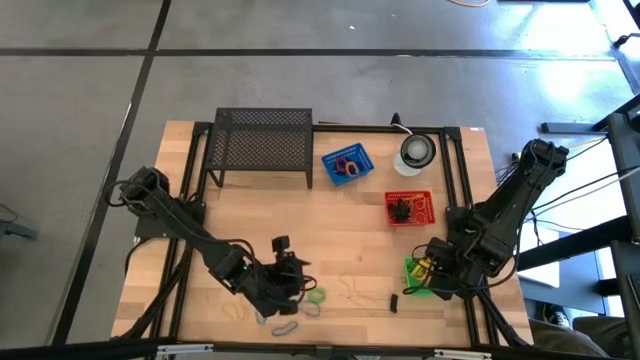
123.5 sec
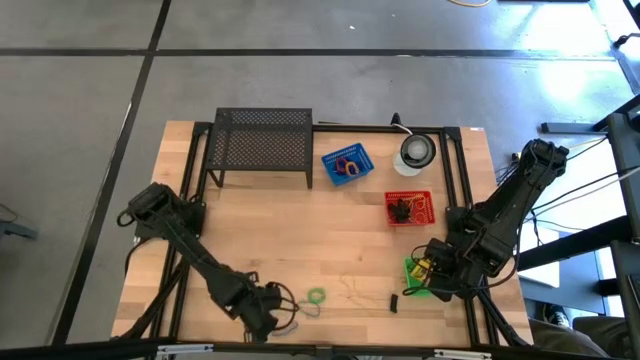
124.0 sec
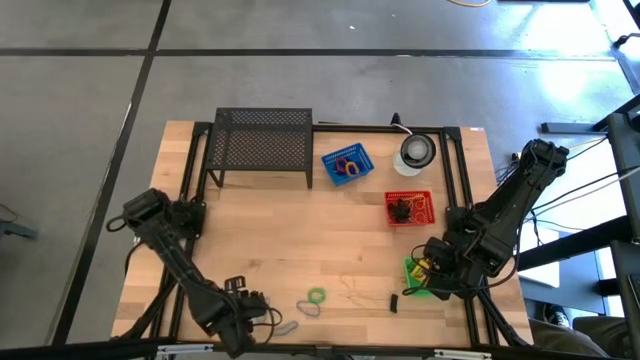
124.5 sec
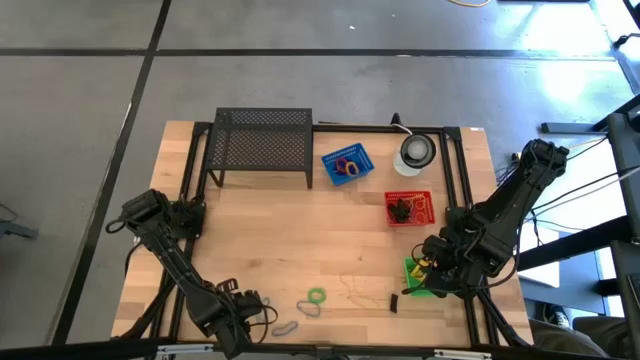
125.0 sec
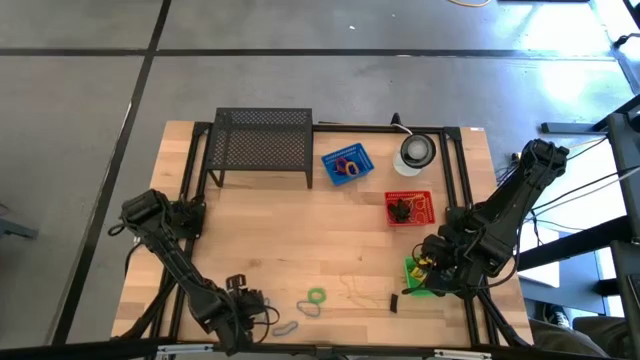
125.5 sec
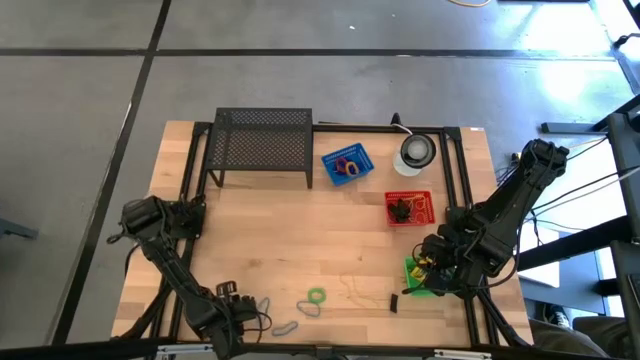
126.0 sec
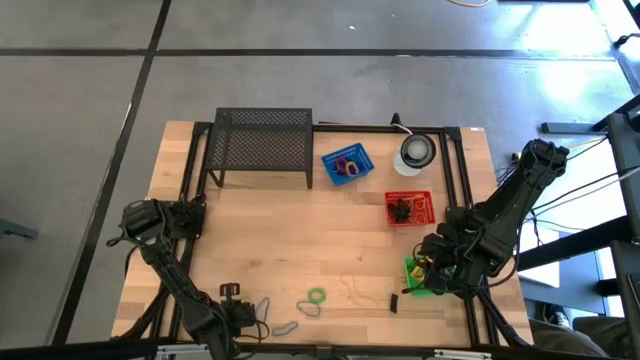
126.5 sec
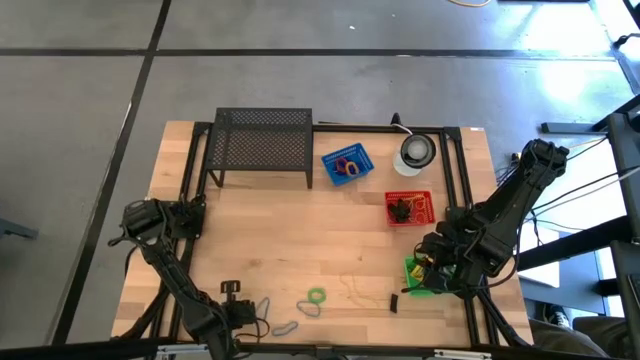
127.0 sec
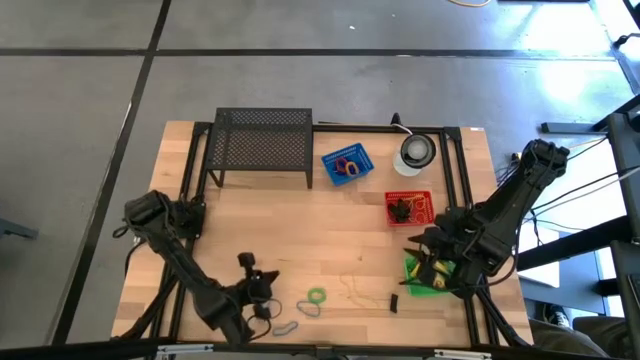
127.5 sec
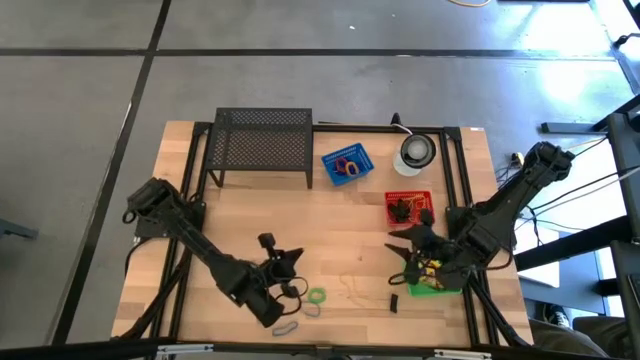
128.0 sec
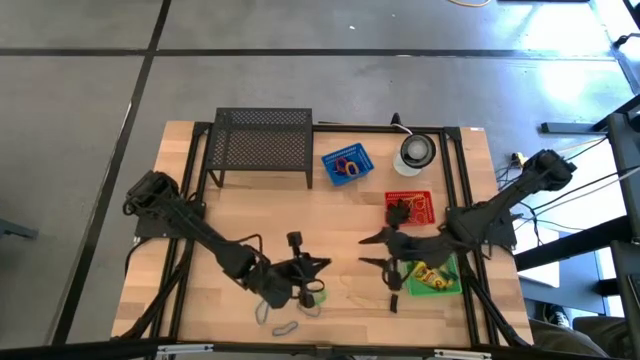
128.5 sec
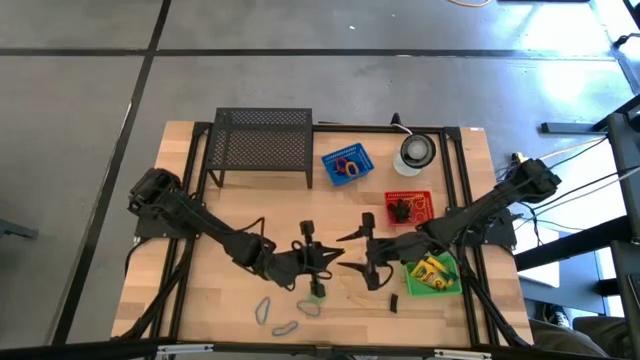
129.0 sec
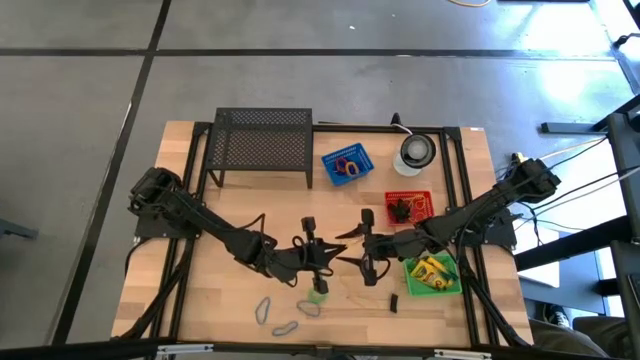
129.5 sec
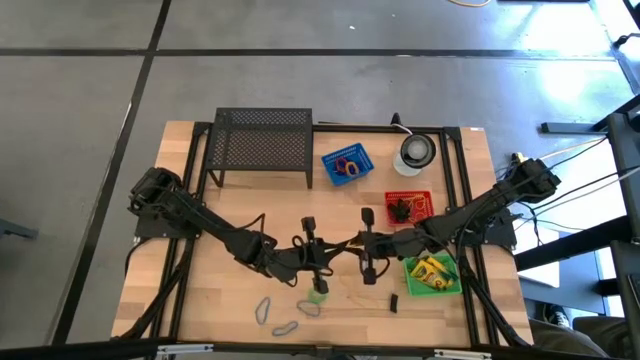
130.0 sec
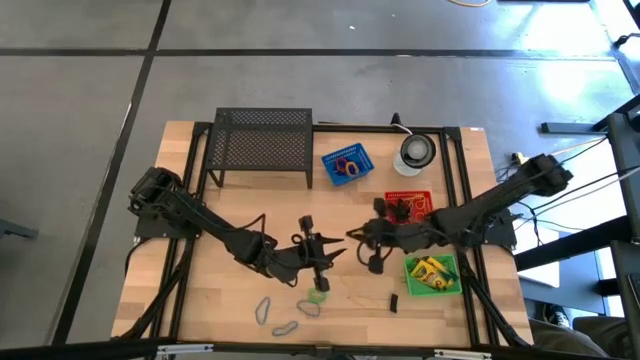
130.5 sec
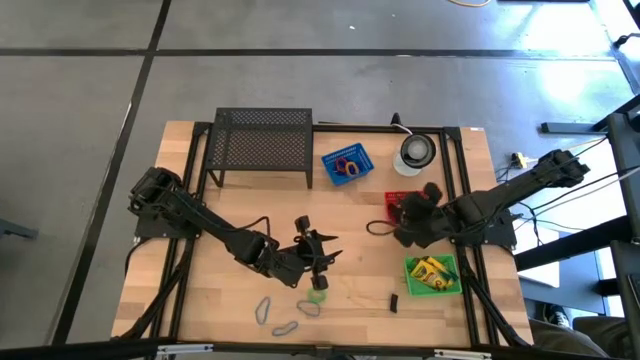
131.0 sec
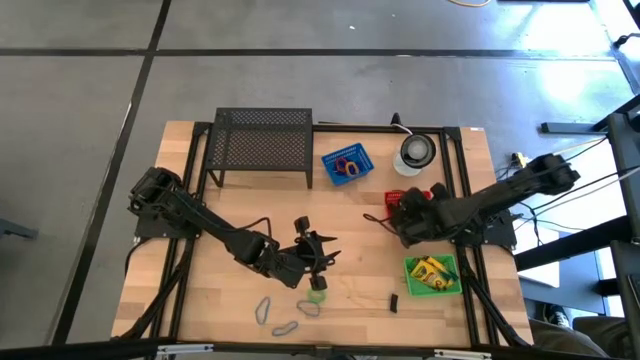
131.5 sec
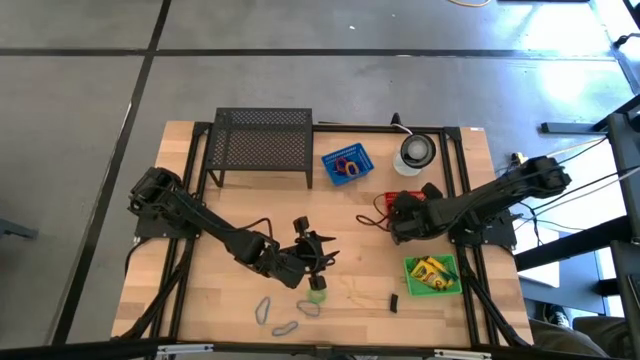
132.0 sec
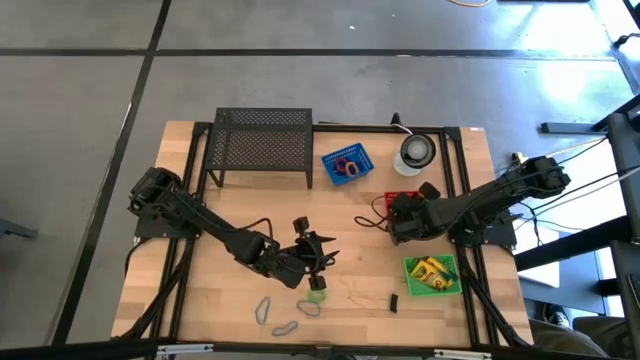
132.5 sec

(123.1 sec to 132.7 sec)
Task: Pick & Place Office Desk Supplies
Put the yellow rubber band into the red bin

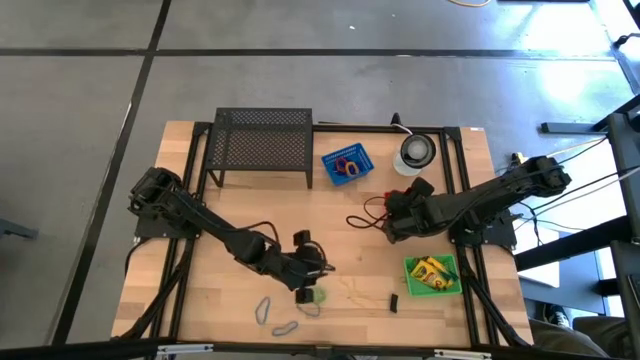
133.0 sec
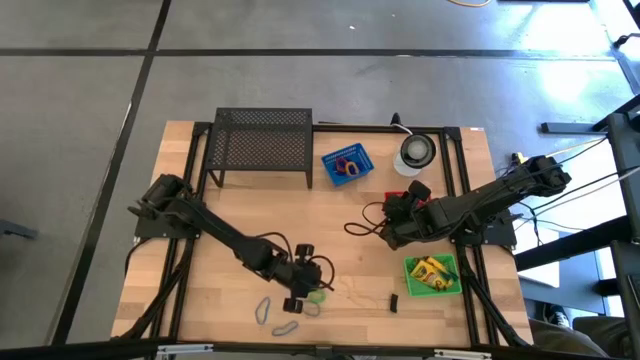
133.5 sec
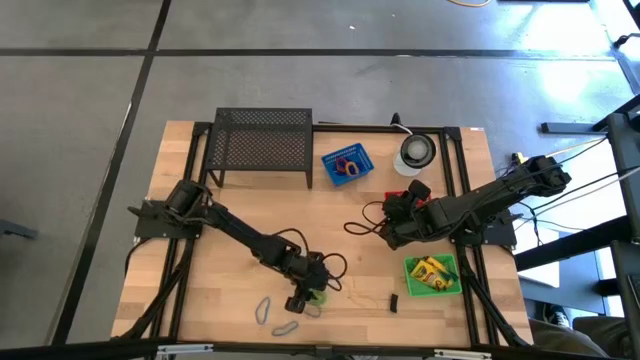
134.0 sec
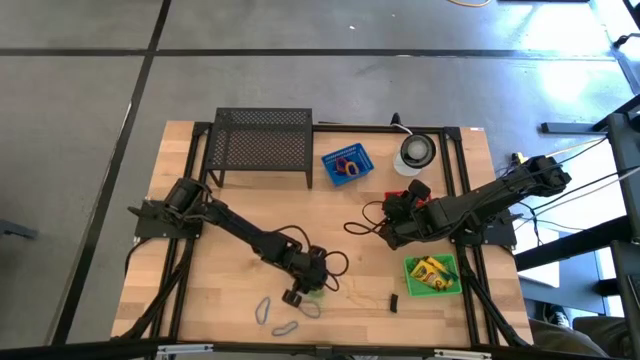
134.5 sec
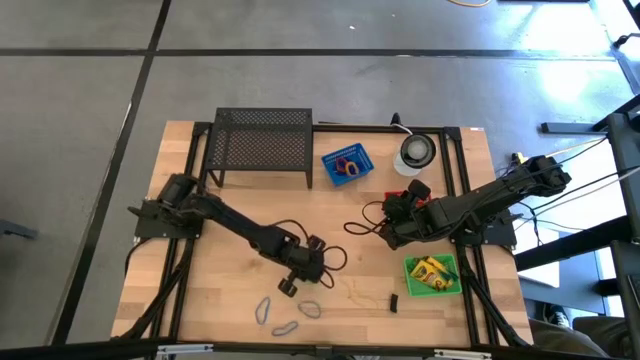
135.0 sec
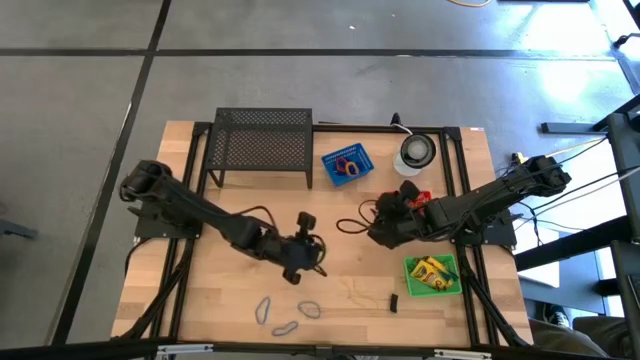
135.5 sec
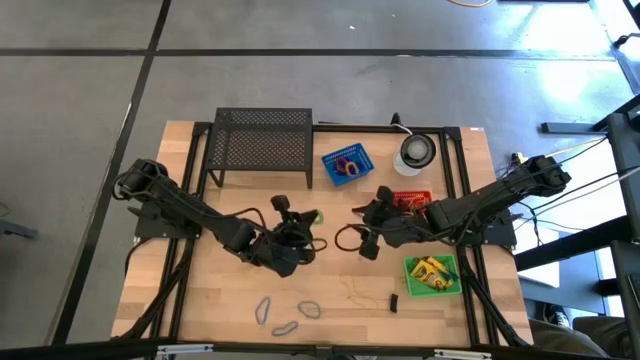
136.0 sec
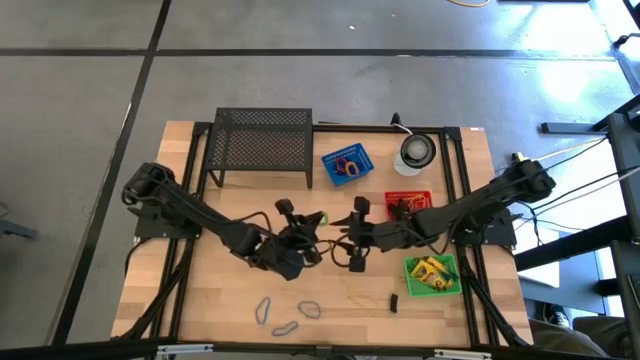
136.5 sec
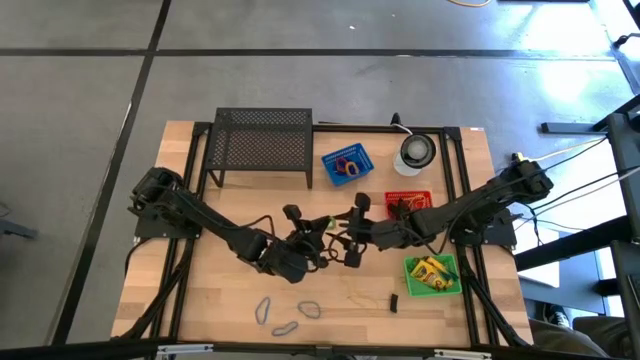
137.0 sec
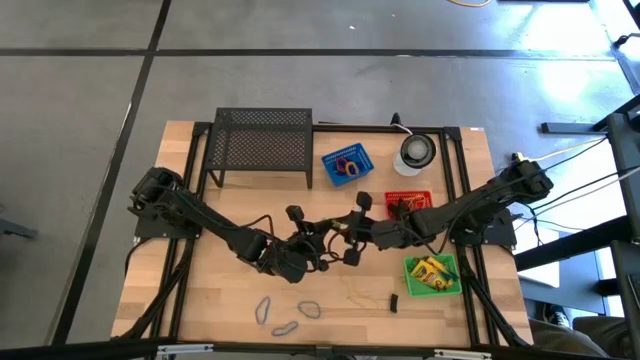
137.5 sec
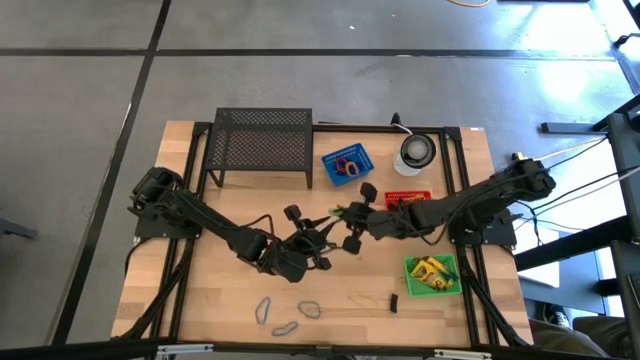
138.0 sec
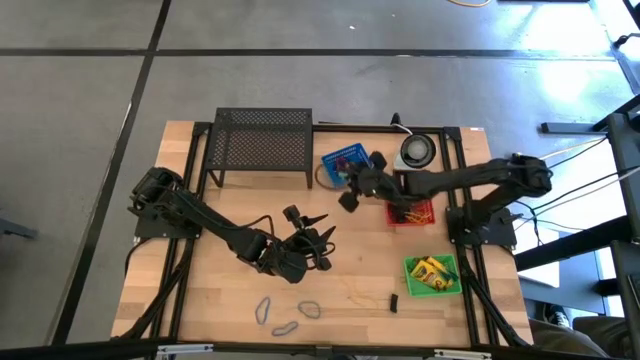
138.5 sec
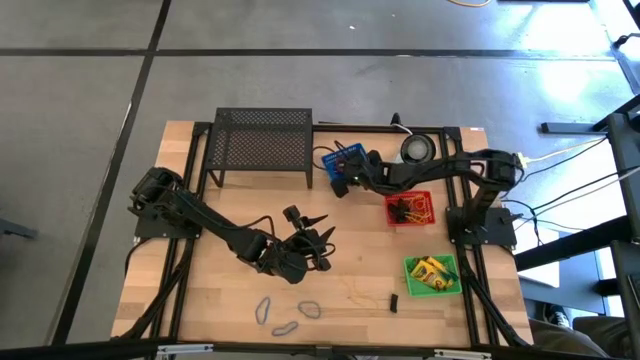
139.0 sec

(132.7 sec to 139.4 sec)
Put the green wrist coil into the blue bin

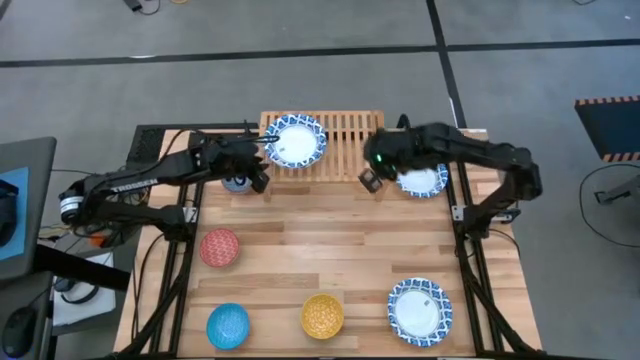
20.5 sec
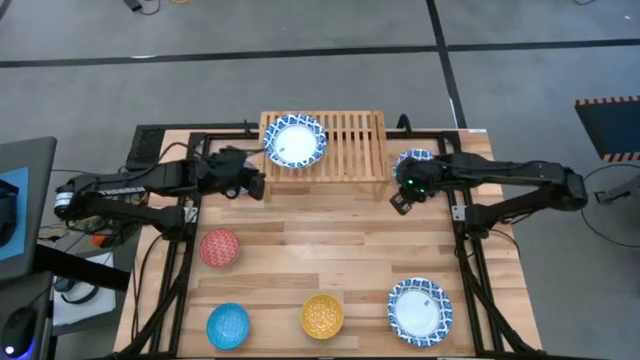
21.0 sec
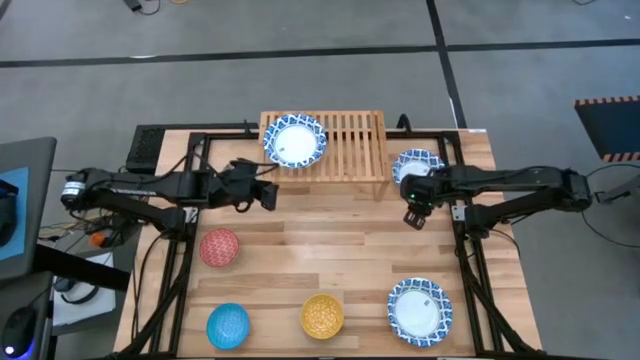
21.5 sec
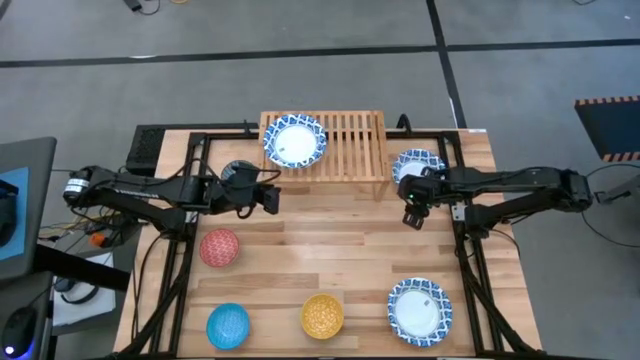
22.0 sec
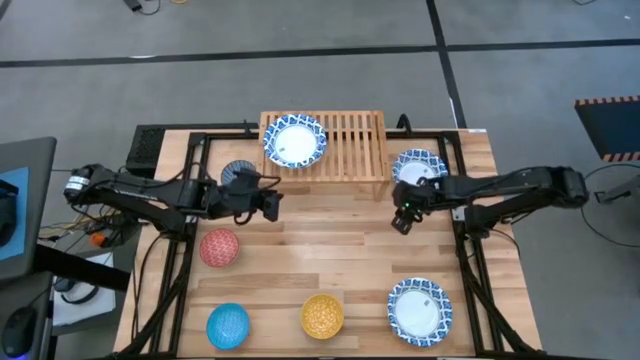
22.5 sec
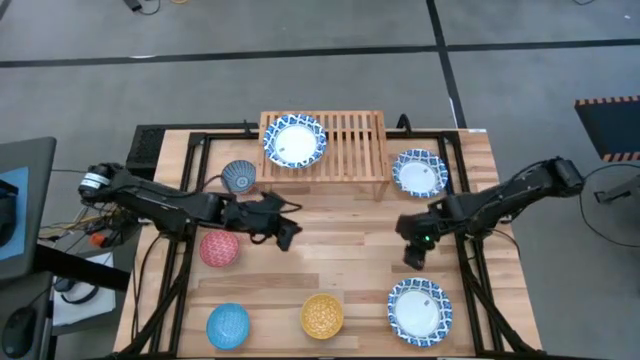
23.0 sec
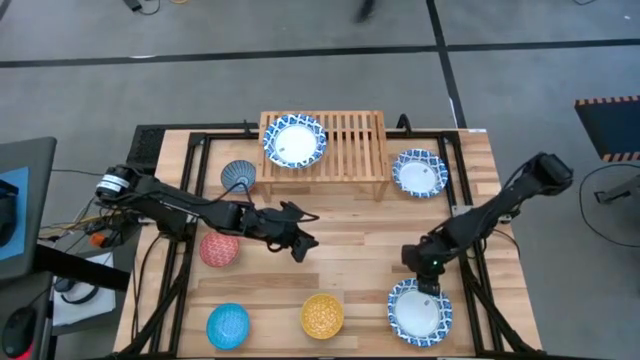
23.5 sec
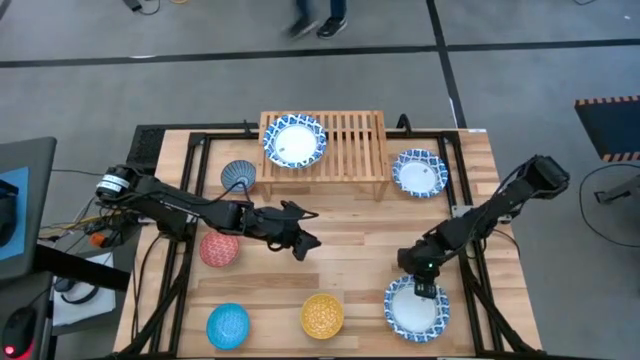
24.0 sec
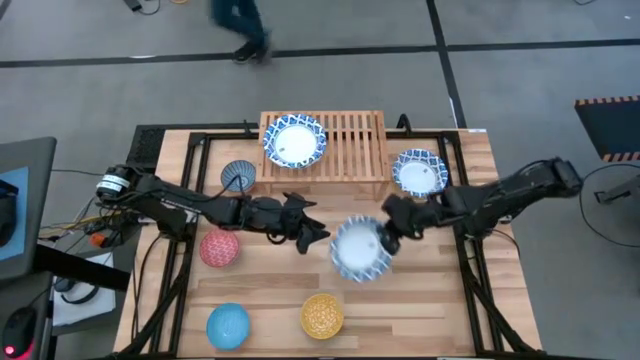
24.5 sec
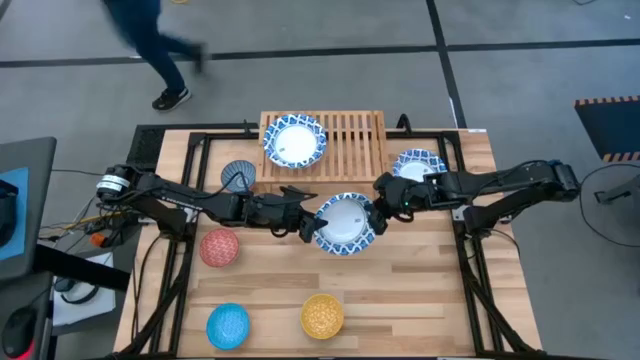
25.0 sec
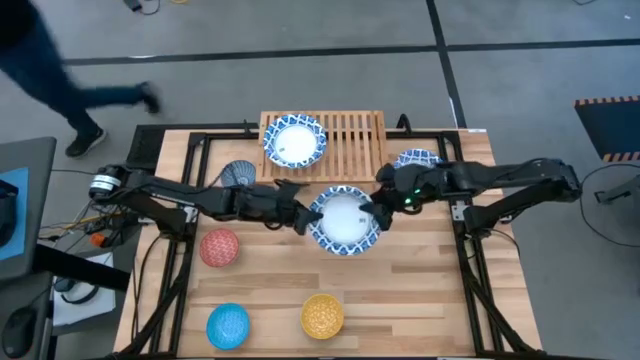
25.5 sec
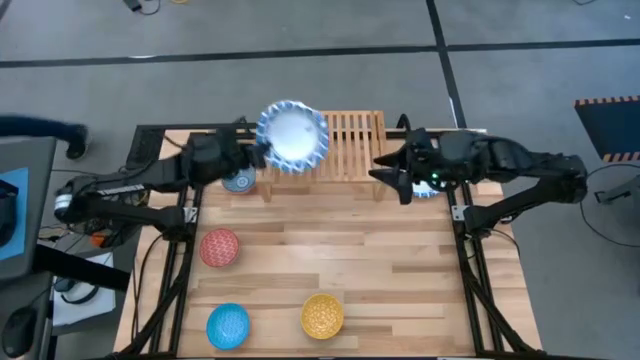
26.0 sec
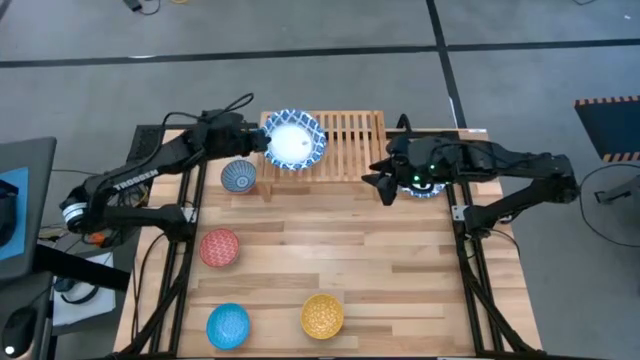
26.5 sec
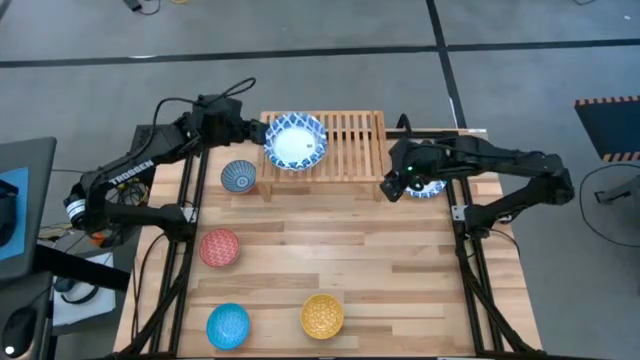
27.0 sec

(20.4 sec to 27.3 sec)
Task: Place and stack bowls onto a shelf
Stack the white bowl on top of the stacked white bowls on the shelf
